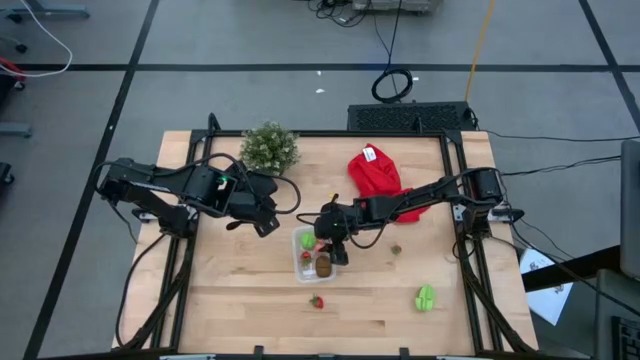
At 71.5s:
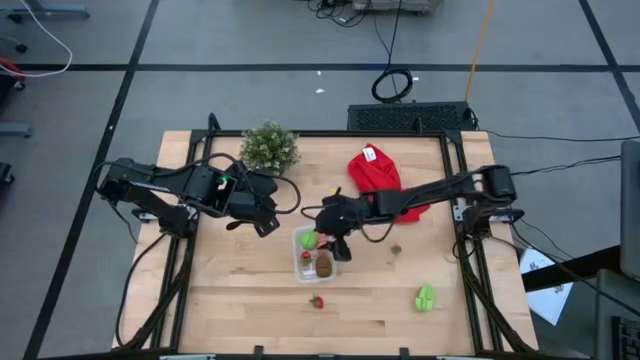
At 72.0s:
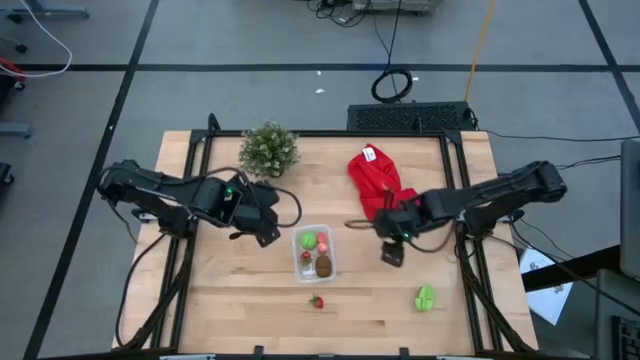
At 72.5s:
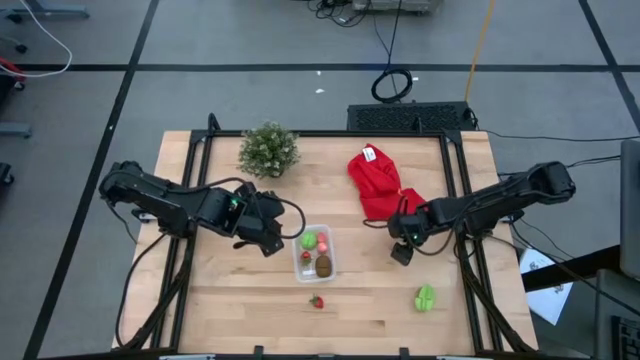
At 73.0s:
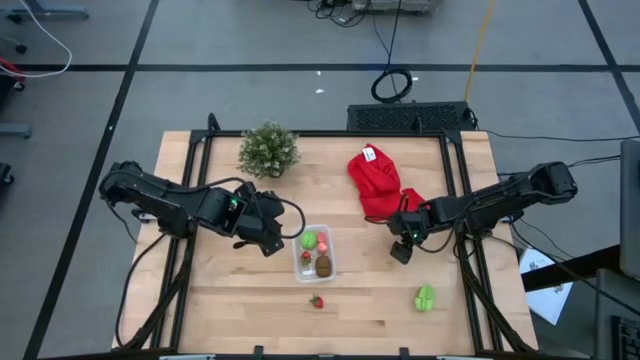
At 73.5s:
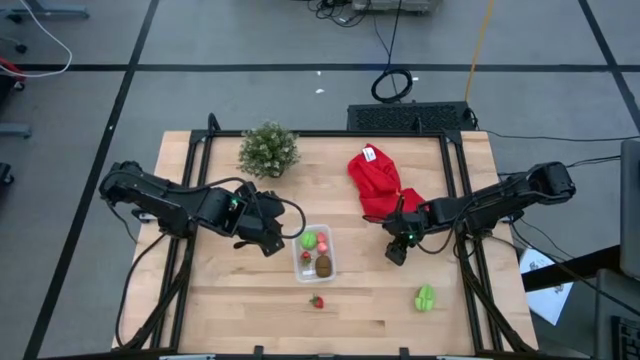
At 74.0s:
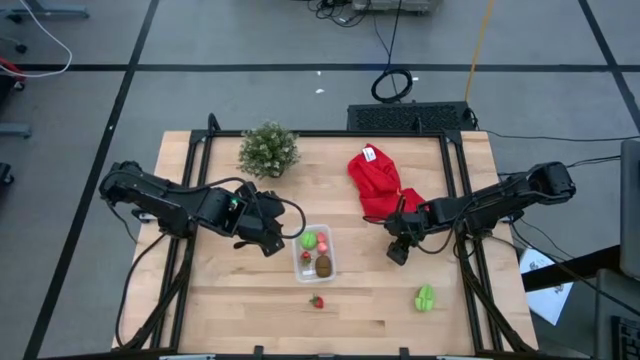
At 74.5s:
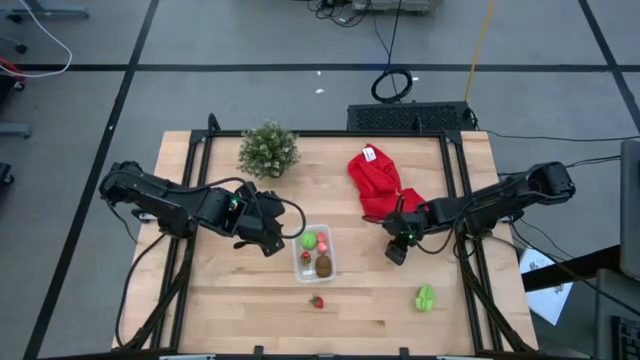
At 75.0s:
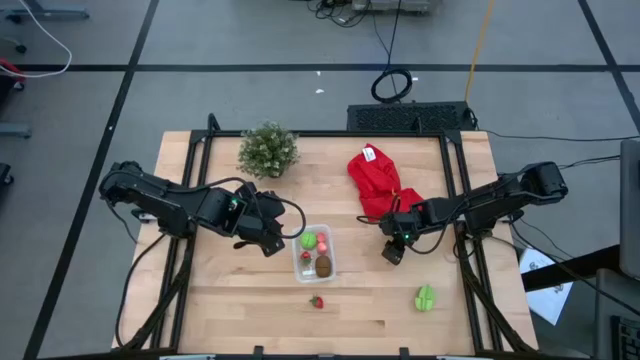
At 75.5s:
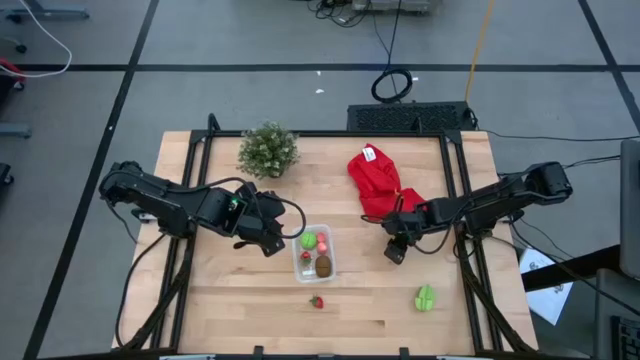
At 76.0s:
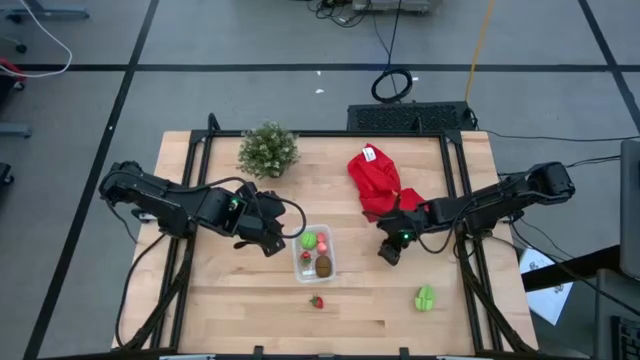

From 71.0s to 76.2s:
Task: Pick and placing Produce into tupperware
Put the top red strawberry into the transparent bin

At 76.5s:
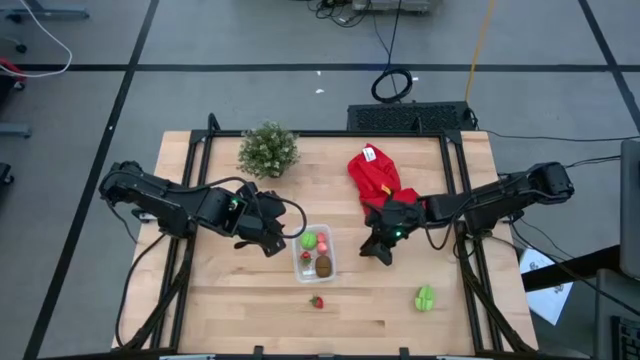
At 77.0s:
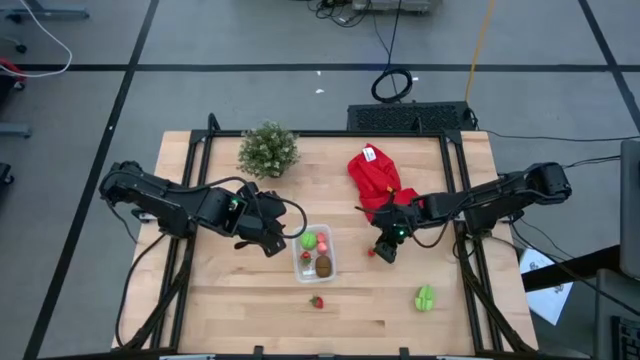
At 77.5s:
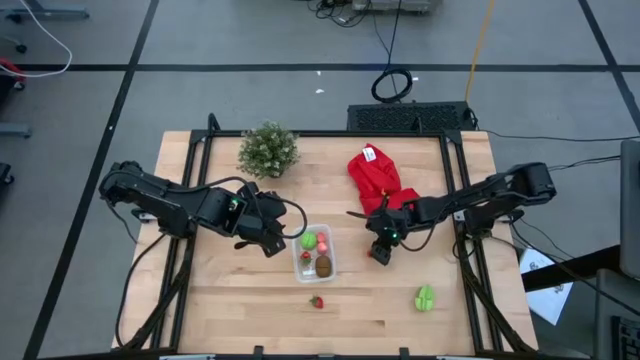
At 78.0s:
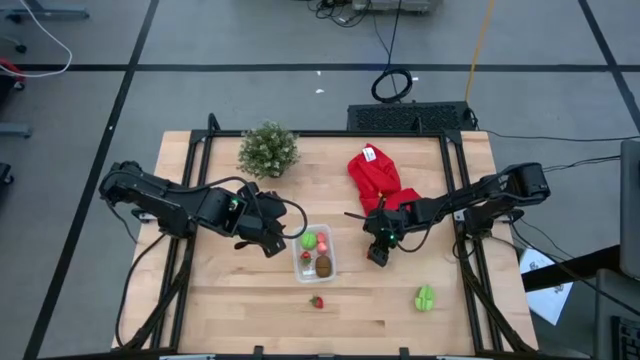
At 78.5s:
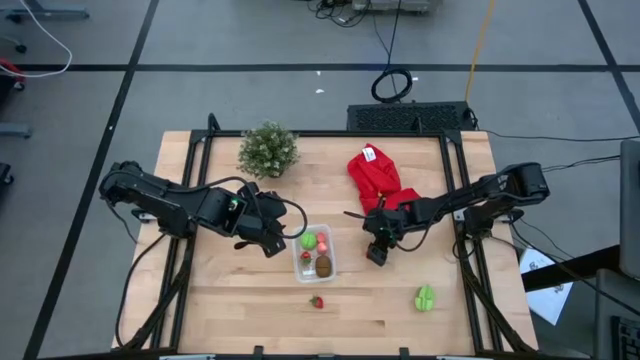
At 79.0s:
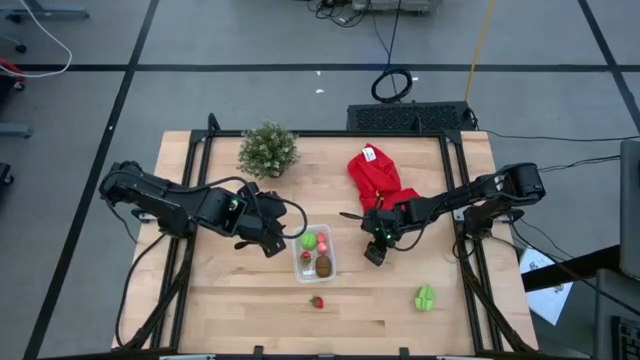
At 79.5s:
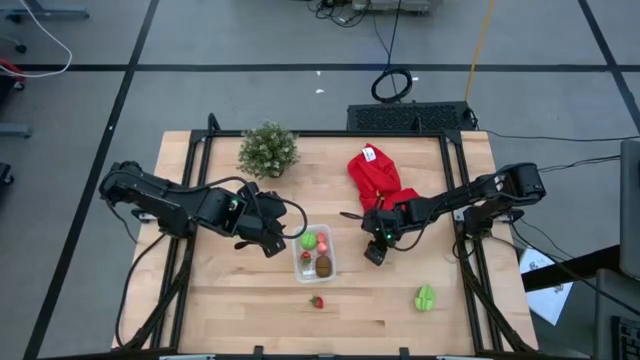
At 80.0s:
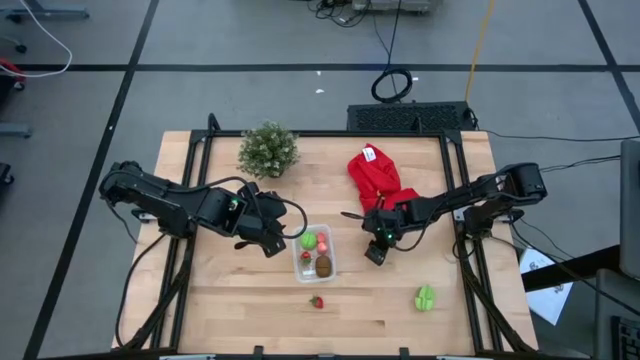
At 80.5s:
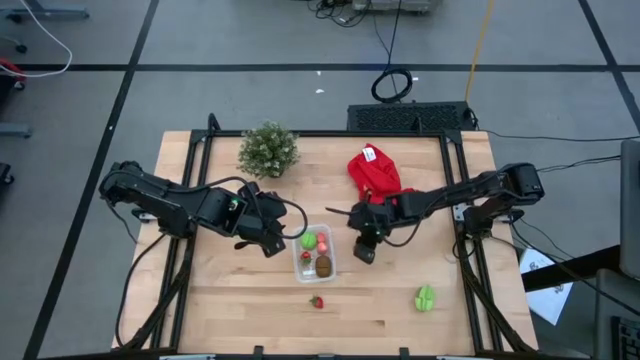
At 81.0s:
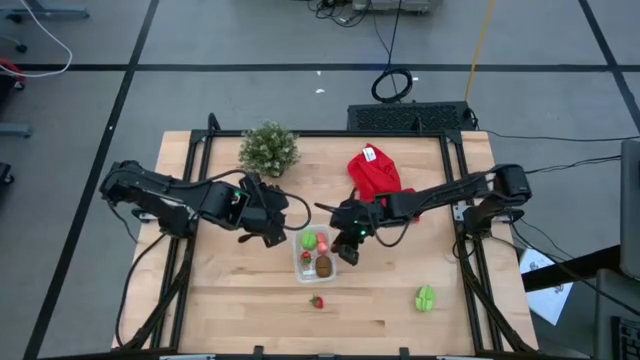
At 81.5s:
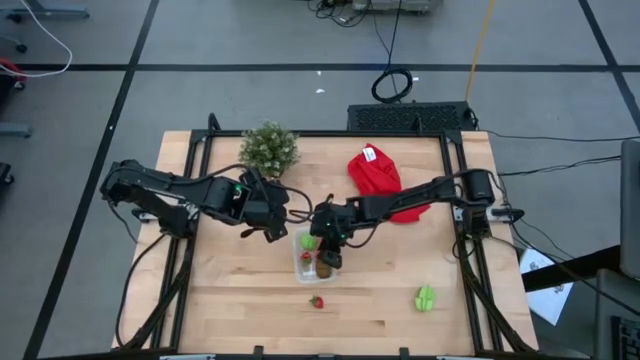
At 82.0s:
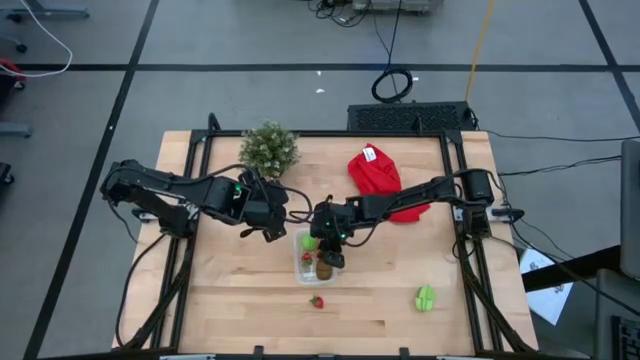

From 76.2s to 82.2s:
Put the top red strawberry into the transparent bin

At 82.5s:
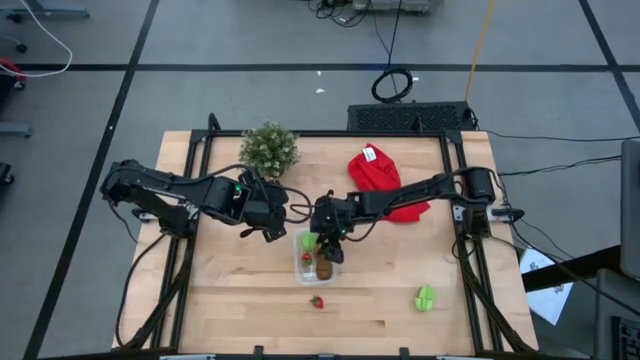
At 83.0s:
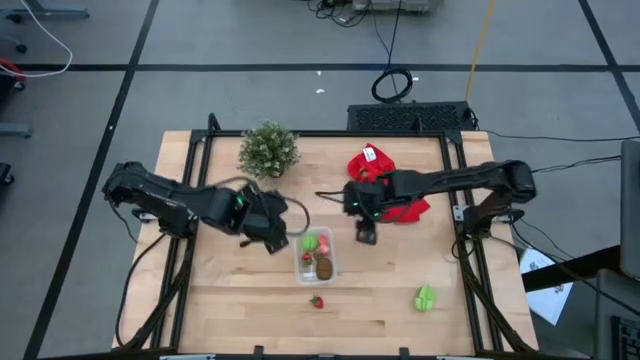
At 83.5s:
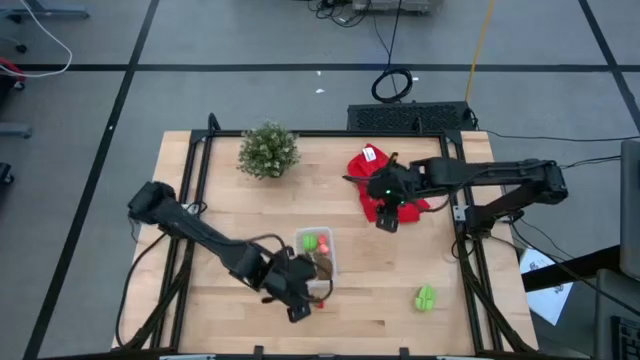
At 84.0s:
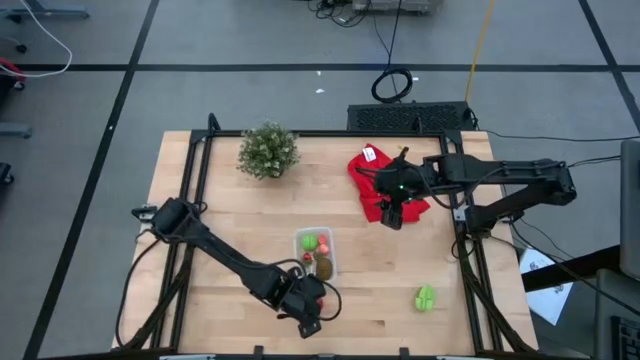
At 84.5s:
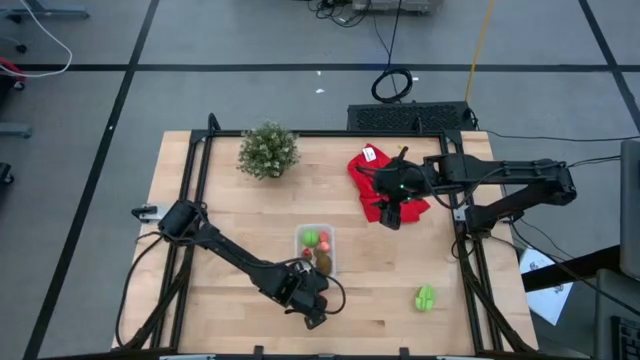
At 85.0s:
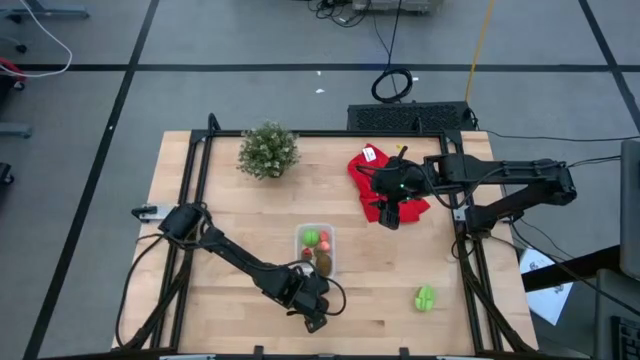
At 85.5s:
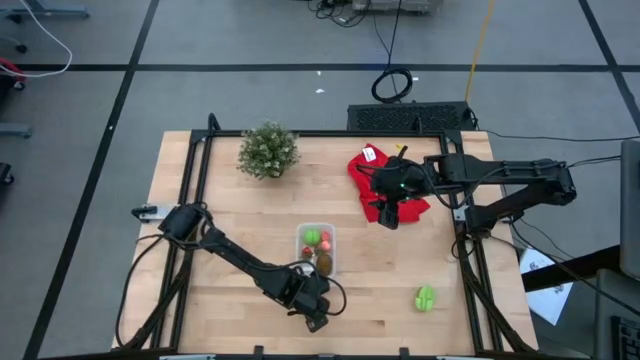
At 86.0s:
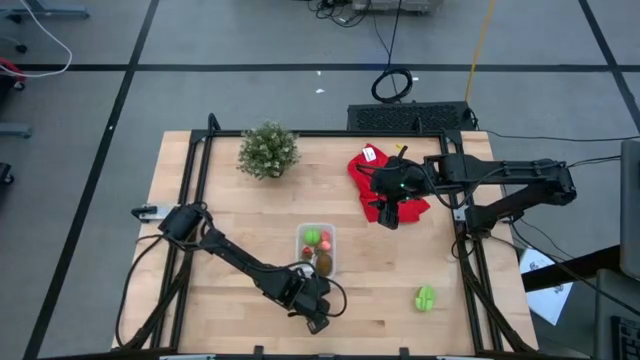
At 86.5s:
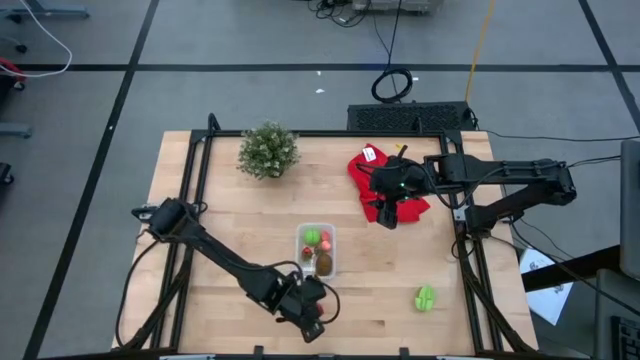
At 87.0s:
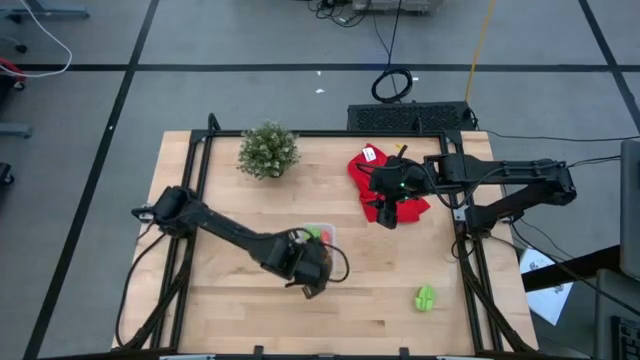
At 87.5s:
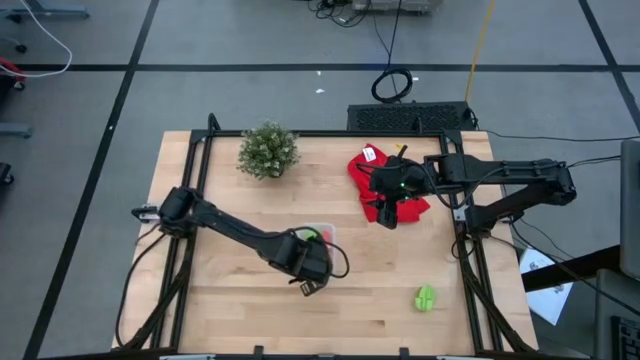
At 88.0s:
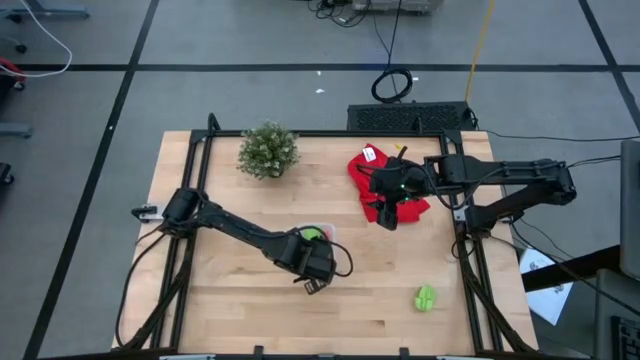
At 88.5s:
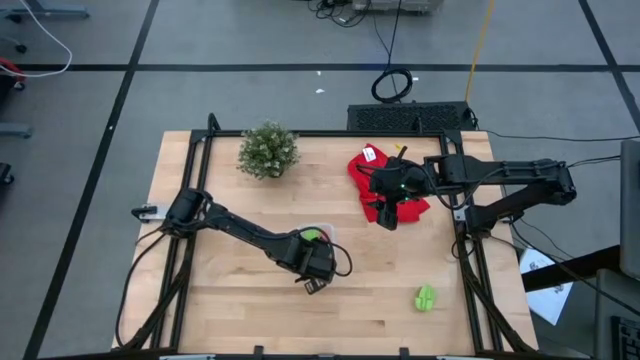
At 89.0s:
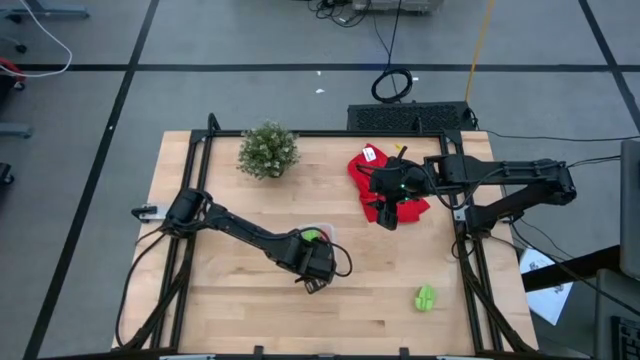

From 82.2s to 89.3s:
Put the red strawberry into the transparent bin

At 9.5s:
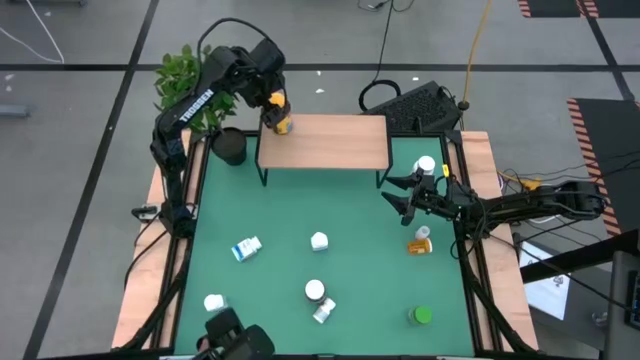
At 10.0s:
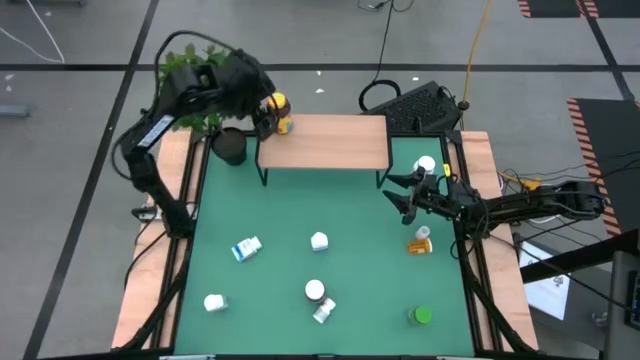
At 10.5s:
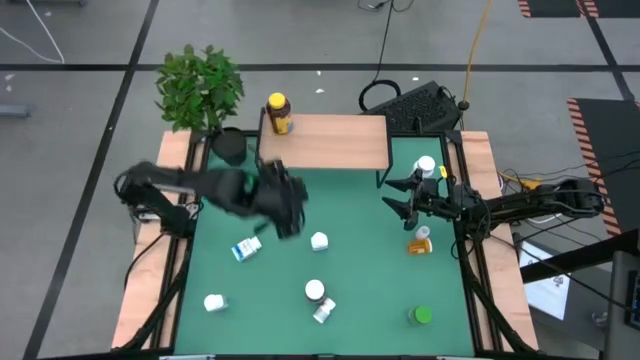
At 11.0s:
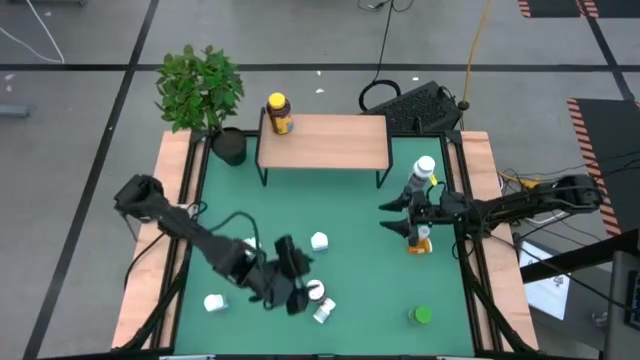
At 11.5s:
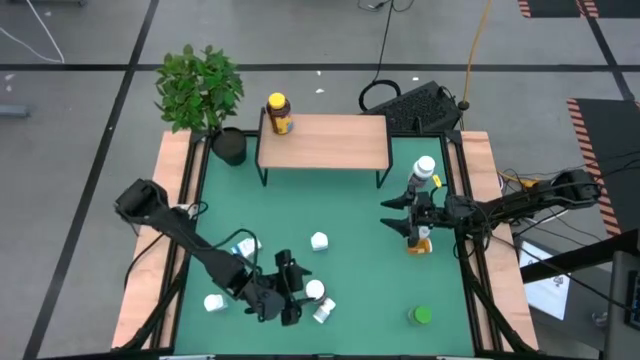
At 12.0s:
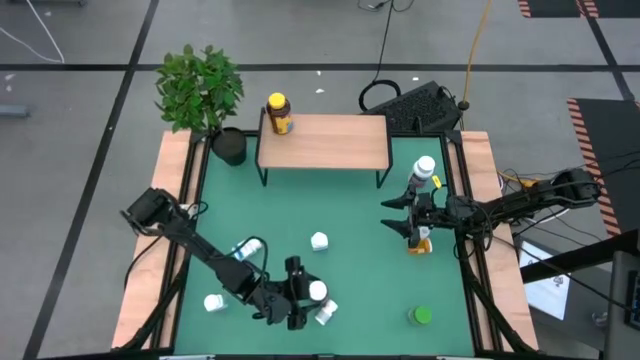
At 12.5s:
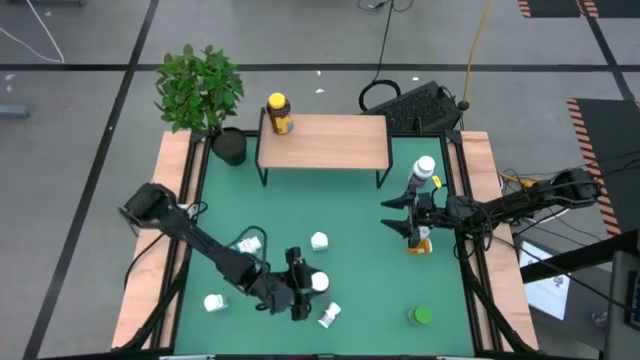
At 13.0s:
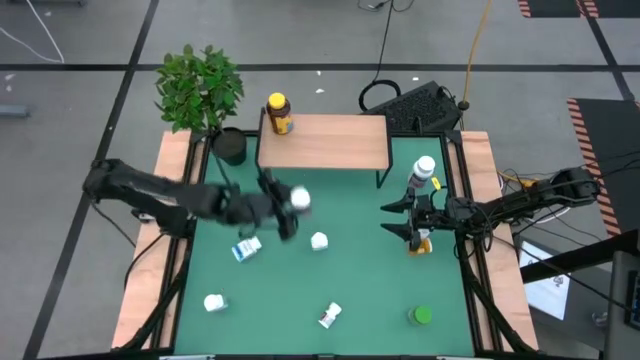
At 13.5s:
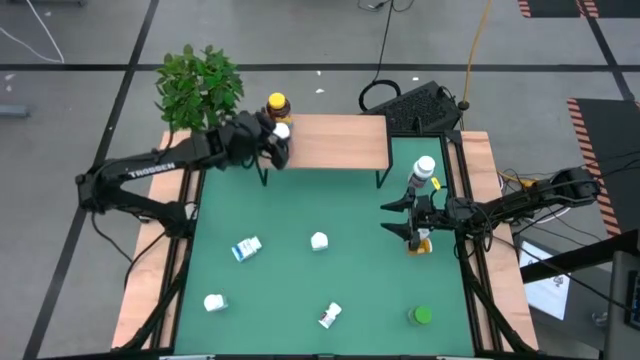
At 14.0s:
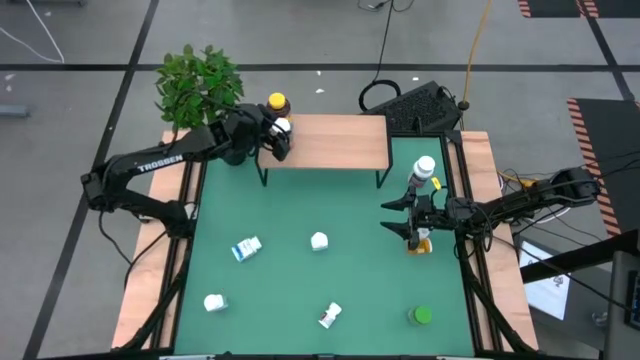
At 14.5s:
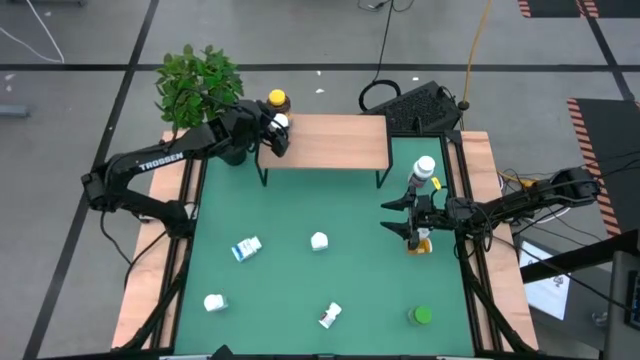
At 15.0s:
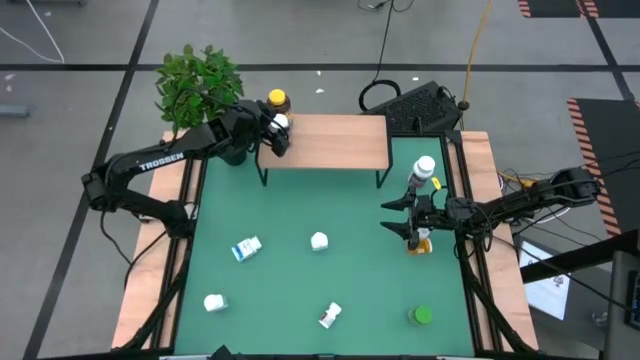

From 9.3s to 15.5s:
Task: Pick and place medicine bottles onto shelf by color
Put the green and orange medicine bottle on the shelf
